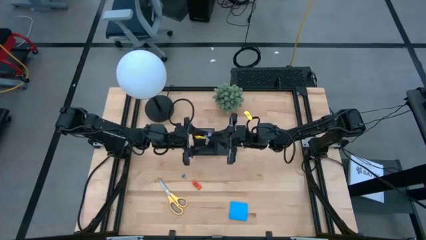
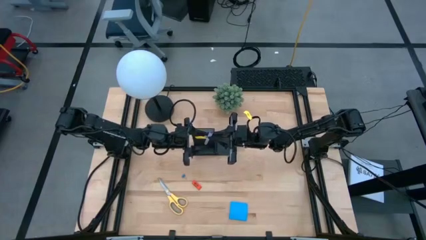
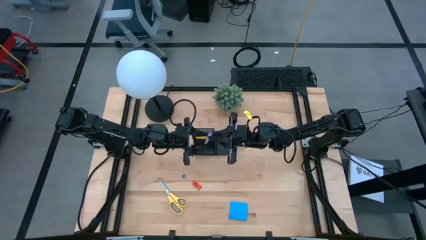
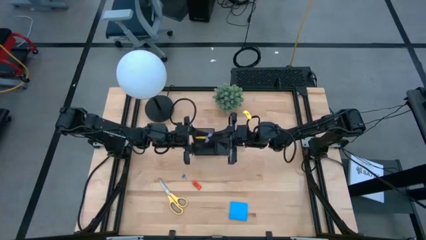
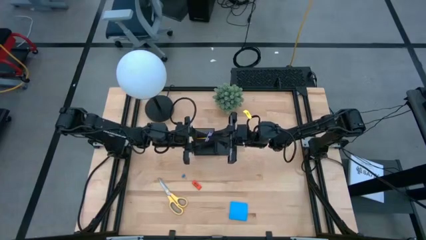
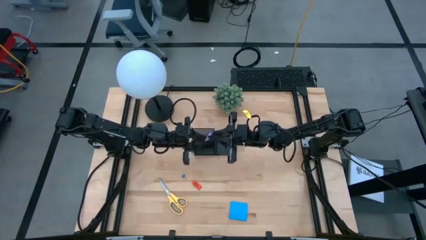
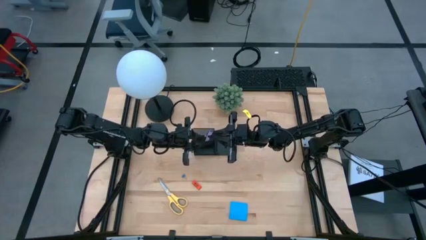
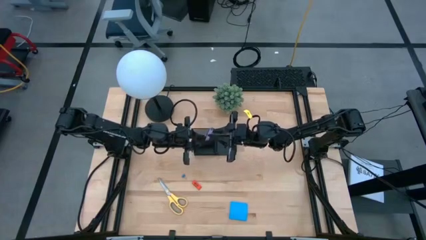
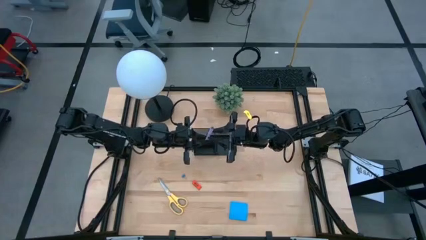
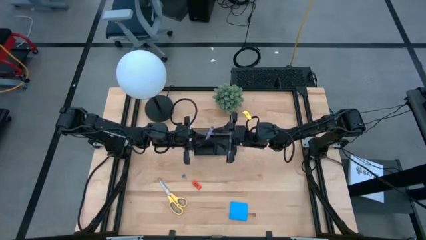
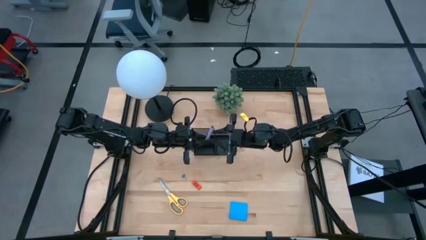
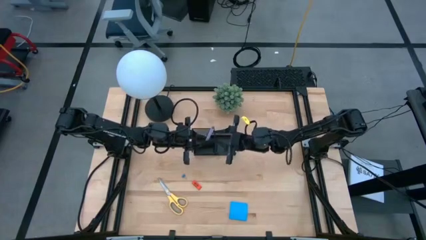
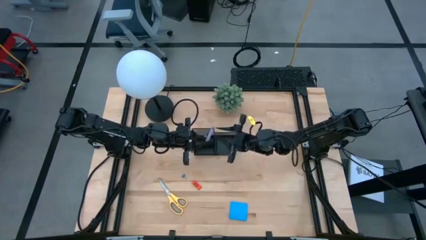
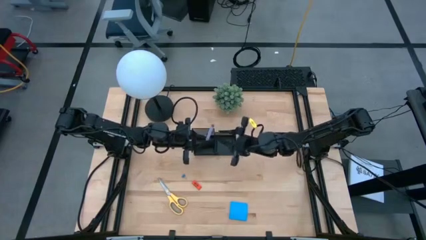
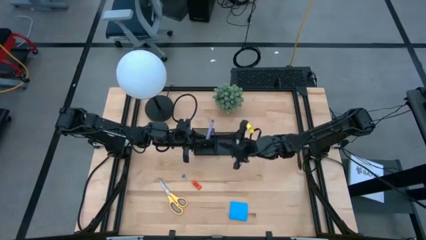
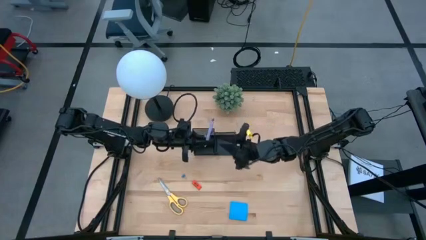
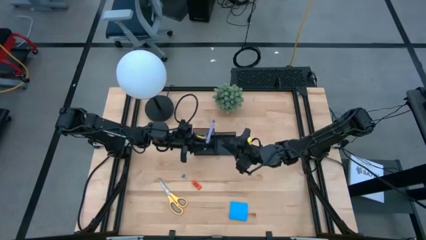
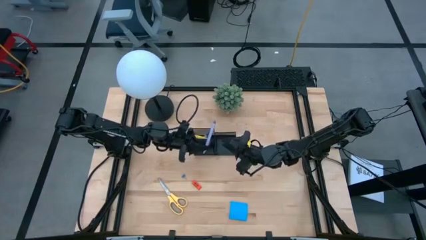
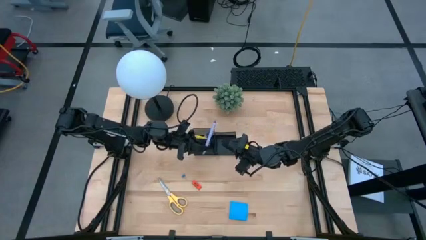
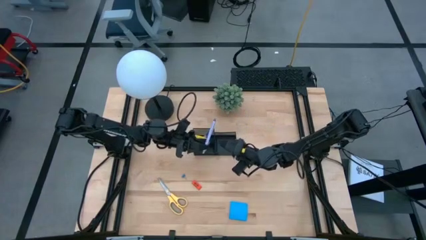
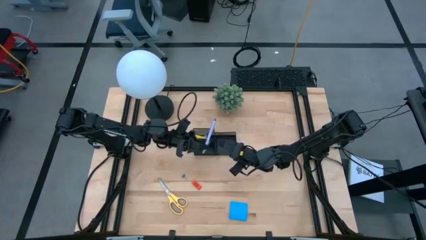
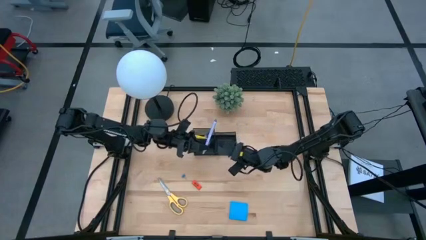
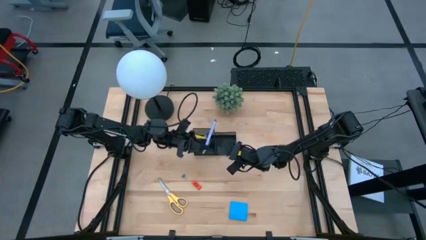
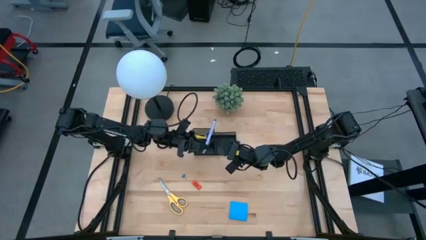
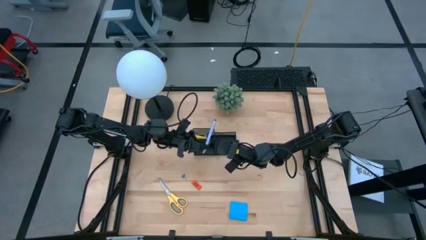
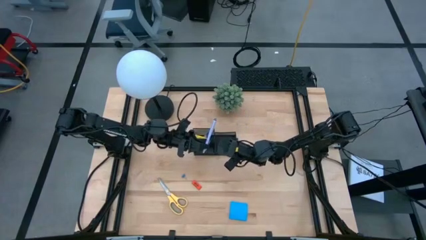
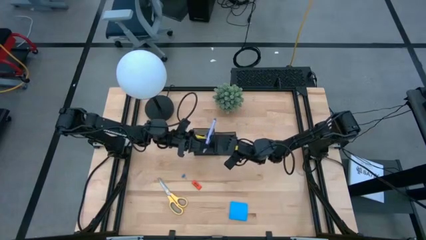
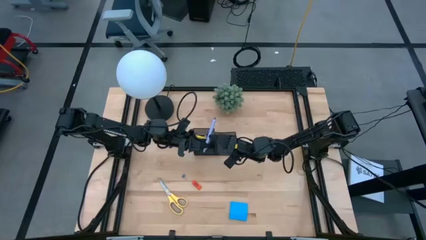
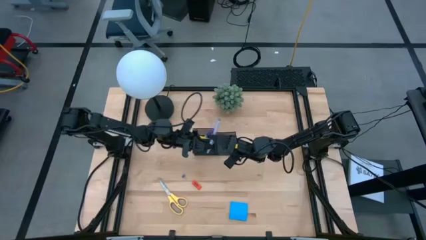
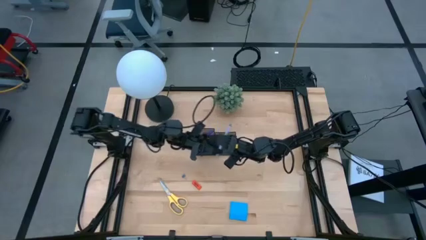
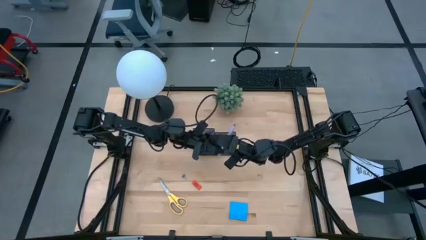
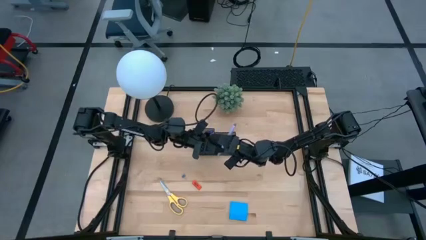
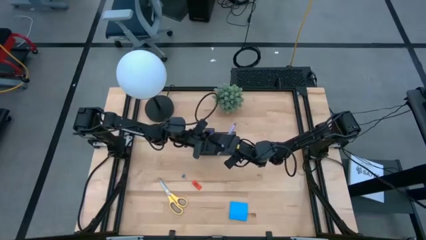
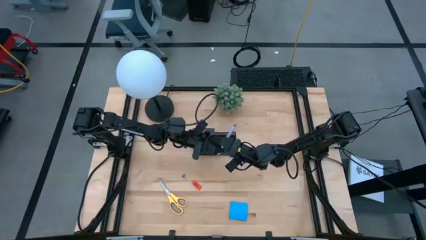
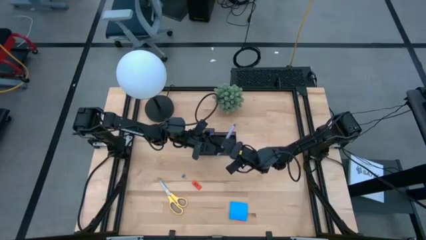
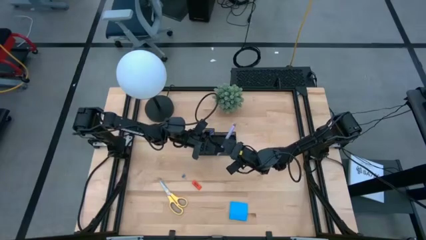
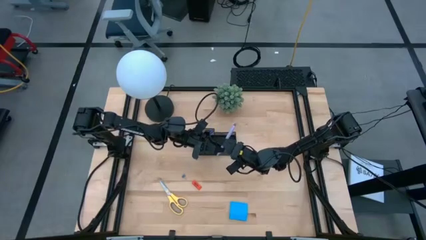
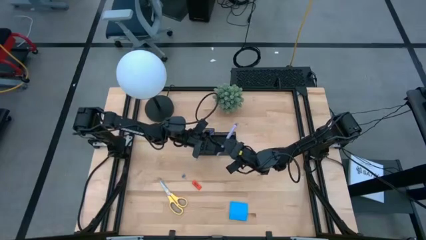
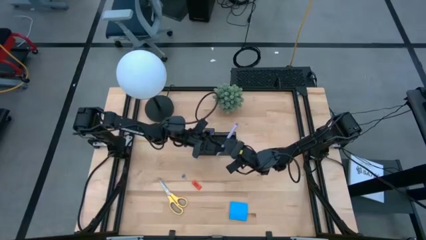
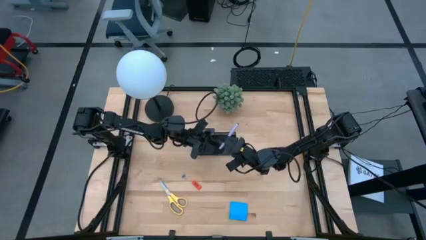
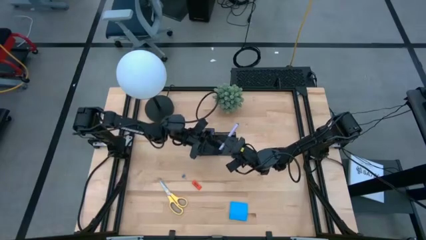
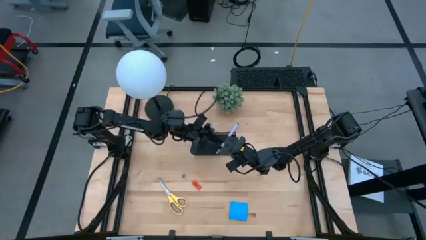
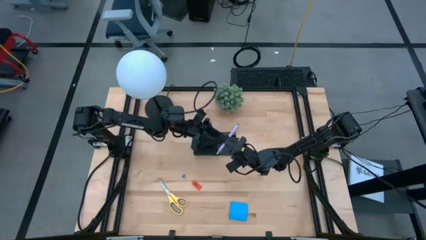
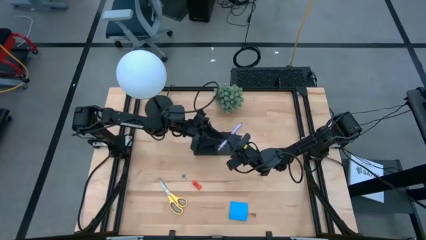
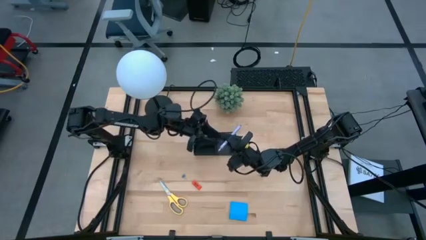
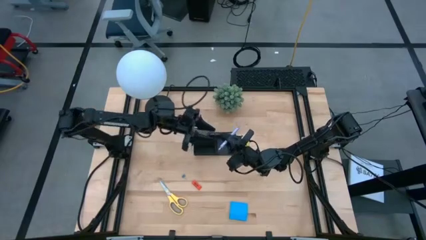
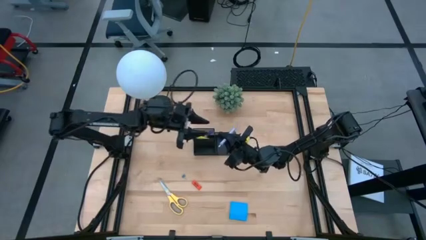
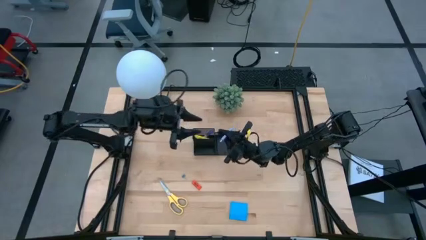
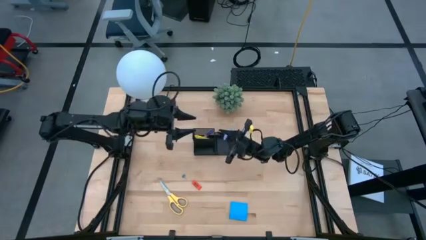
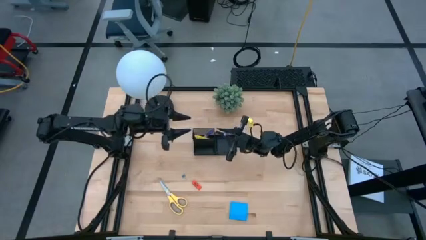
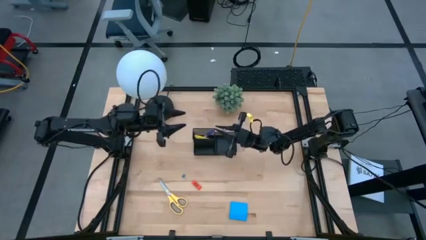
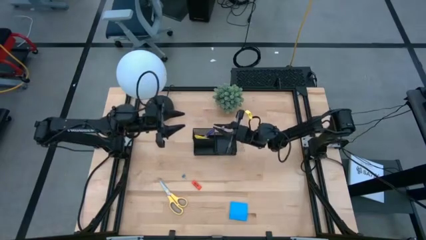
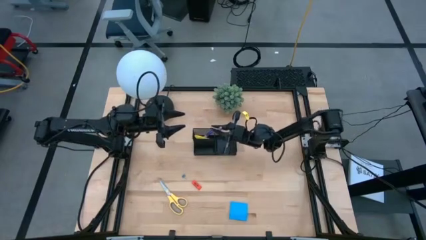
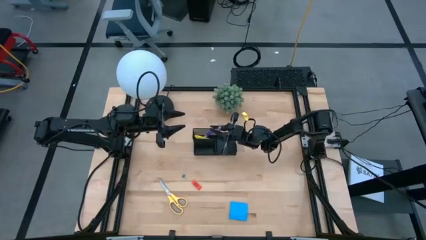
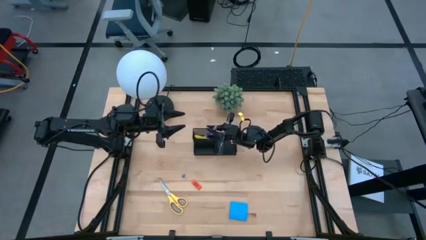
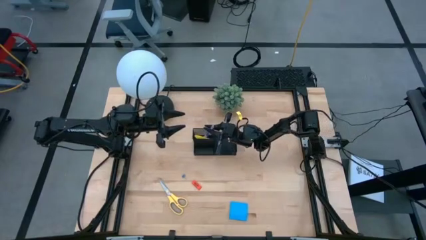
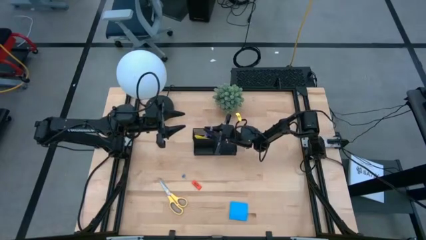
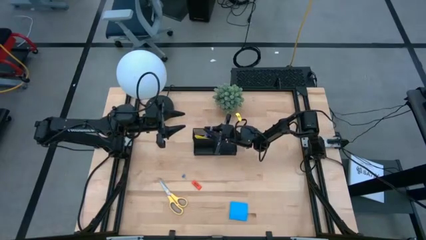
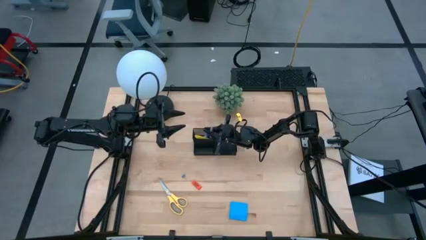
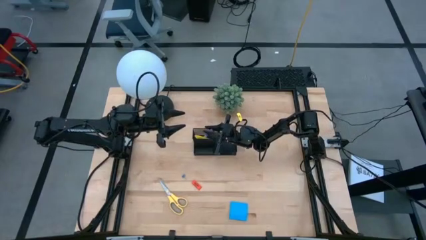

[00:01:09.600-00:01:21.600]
Task: Pick and place office supplies into organizer
Put the purple pen into the desk organizer
